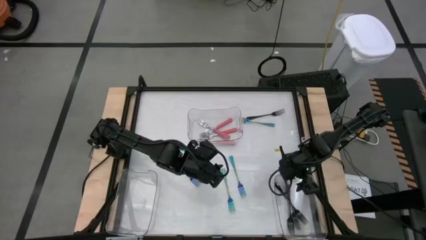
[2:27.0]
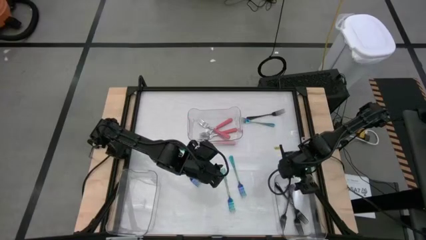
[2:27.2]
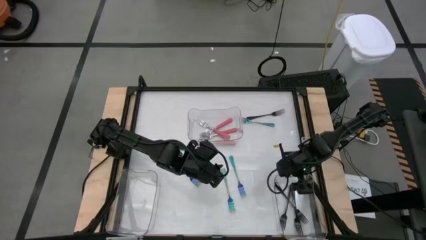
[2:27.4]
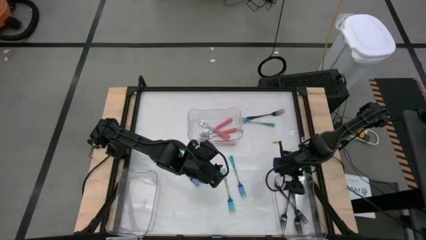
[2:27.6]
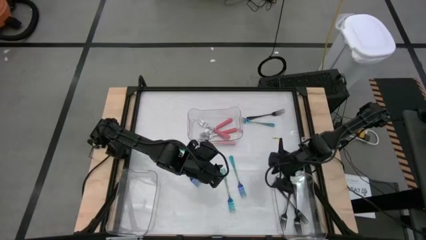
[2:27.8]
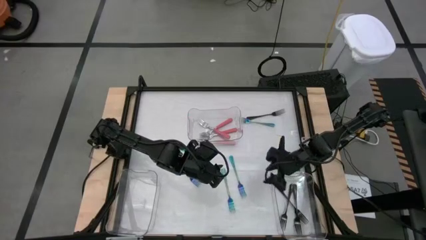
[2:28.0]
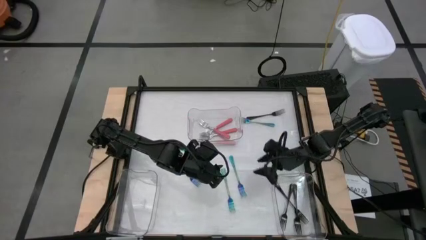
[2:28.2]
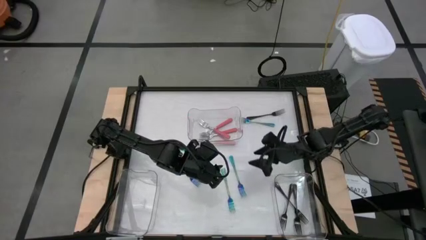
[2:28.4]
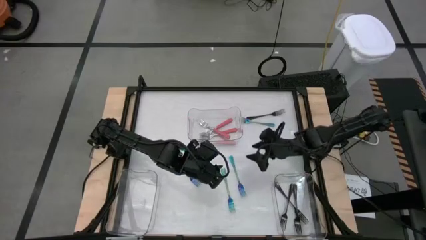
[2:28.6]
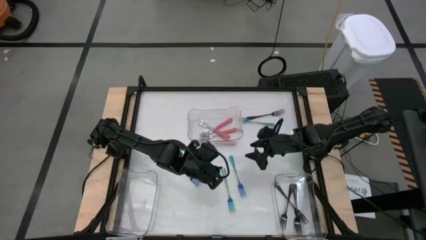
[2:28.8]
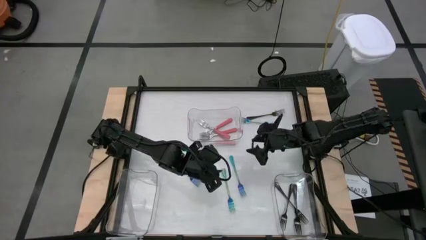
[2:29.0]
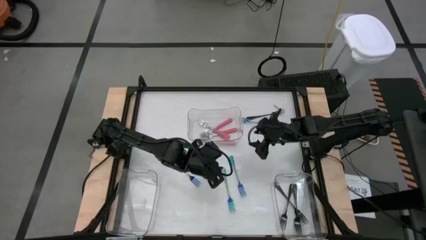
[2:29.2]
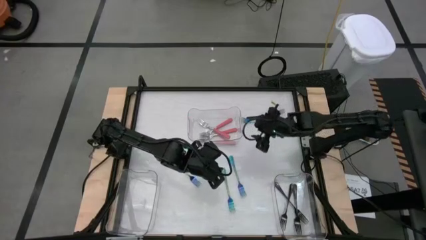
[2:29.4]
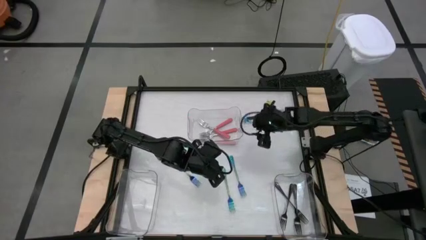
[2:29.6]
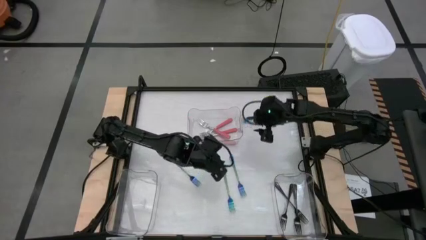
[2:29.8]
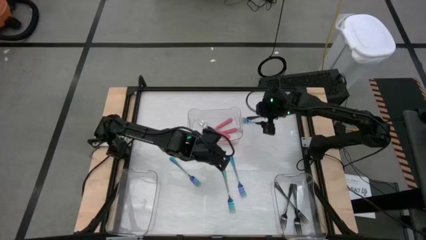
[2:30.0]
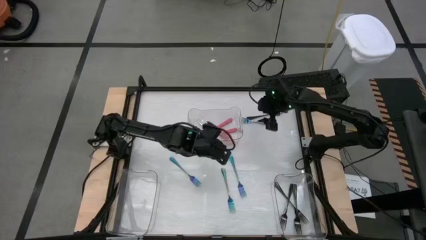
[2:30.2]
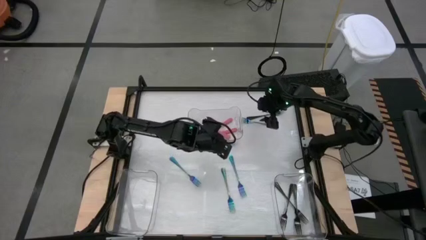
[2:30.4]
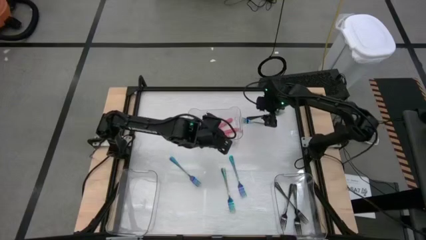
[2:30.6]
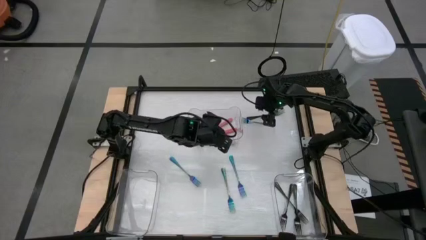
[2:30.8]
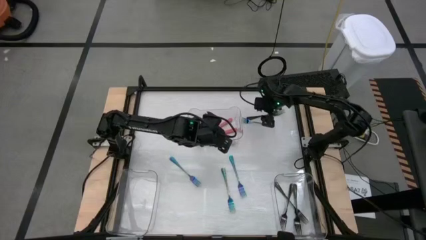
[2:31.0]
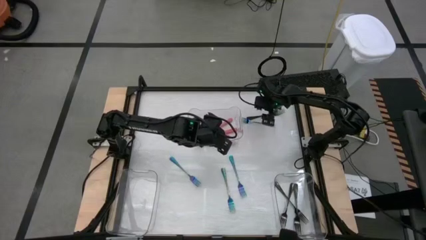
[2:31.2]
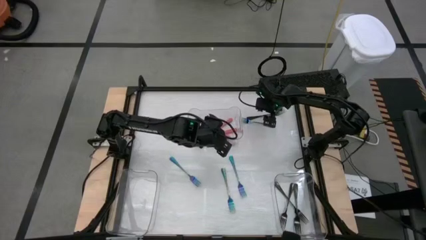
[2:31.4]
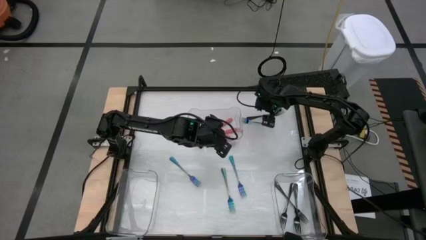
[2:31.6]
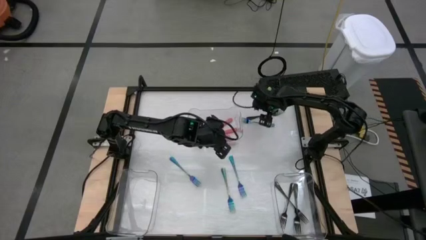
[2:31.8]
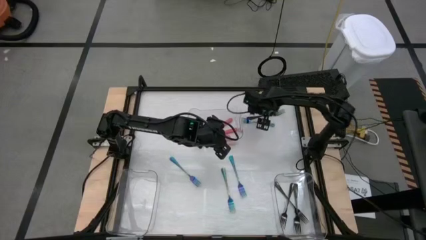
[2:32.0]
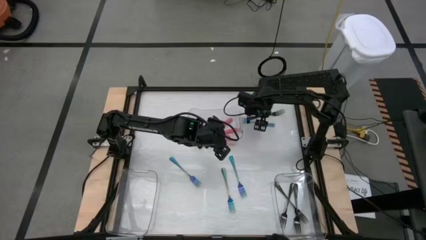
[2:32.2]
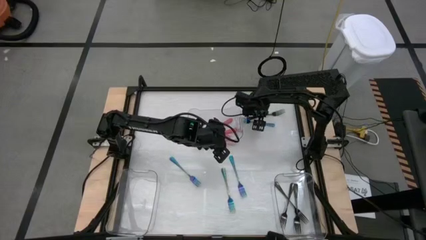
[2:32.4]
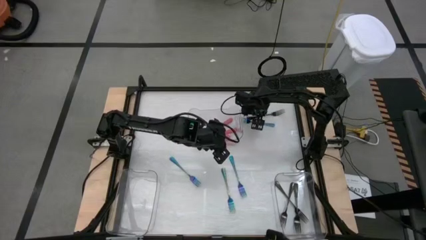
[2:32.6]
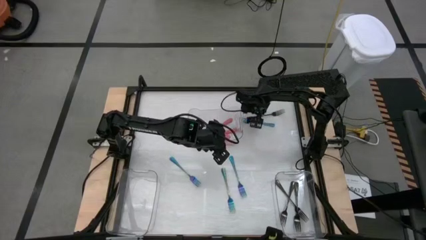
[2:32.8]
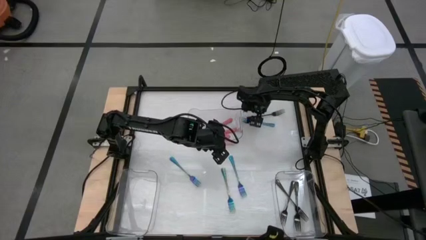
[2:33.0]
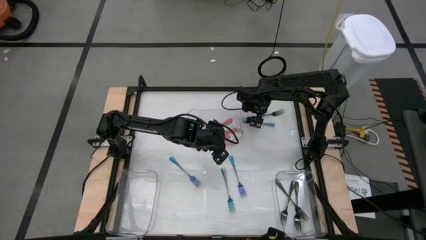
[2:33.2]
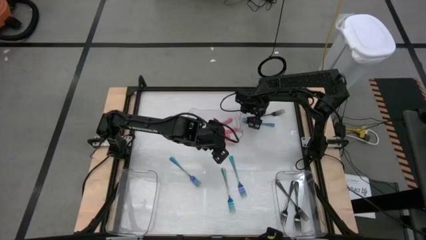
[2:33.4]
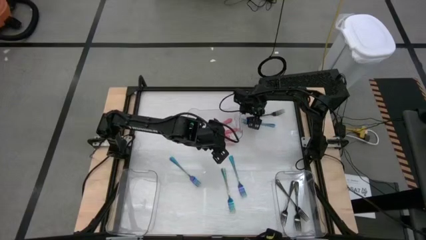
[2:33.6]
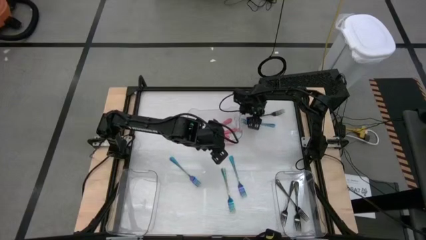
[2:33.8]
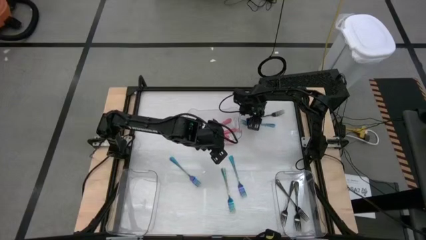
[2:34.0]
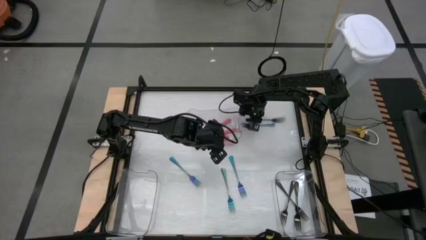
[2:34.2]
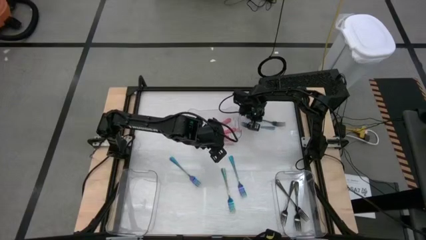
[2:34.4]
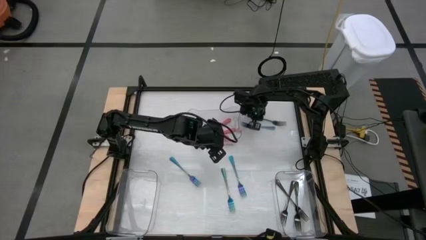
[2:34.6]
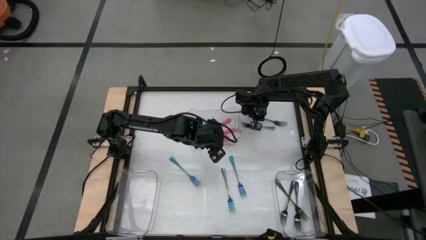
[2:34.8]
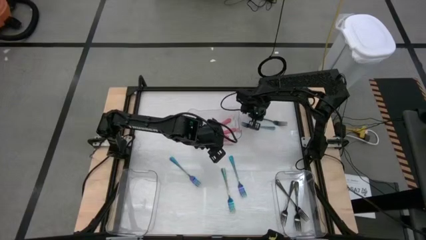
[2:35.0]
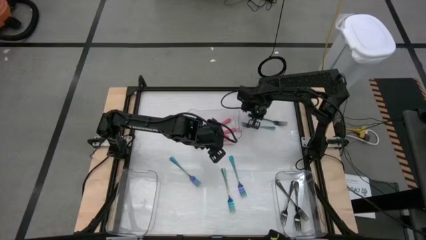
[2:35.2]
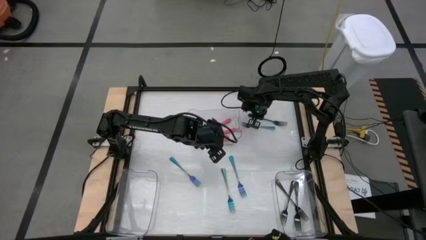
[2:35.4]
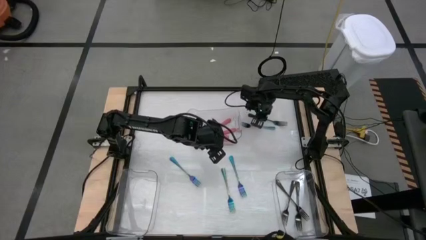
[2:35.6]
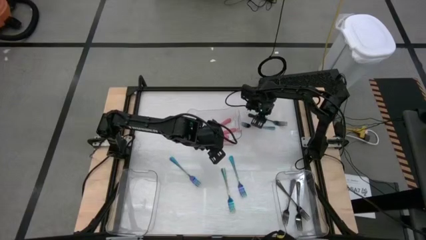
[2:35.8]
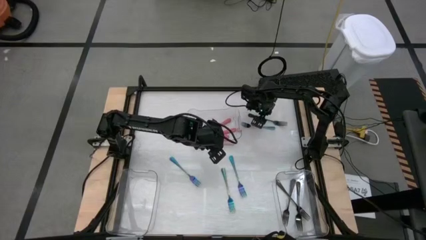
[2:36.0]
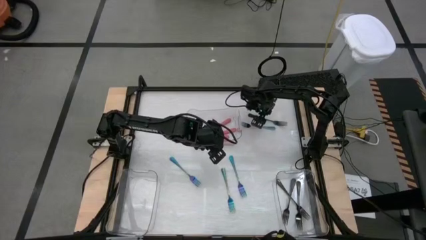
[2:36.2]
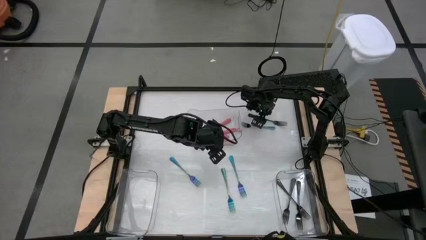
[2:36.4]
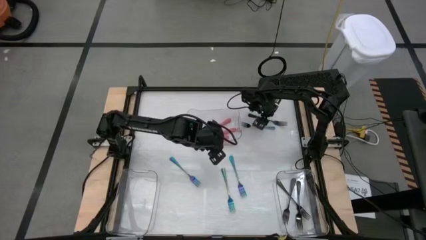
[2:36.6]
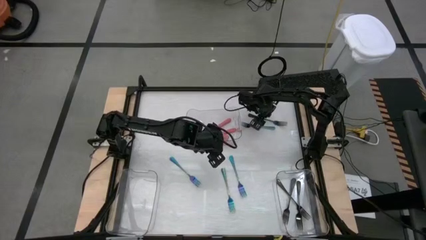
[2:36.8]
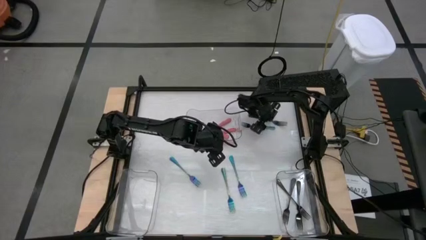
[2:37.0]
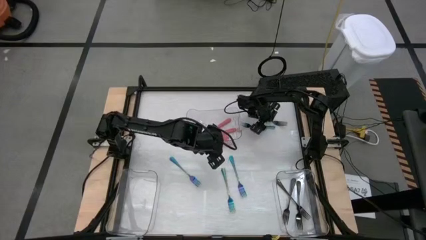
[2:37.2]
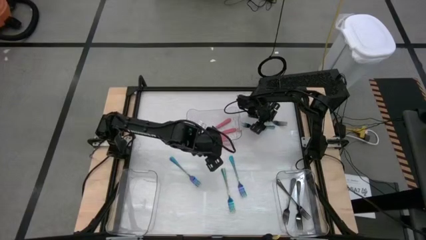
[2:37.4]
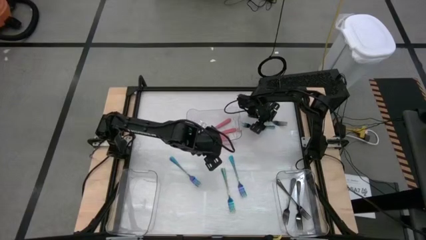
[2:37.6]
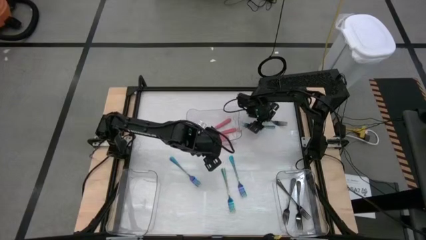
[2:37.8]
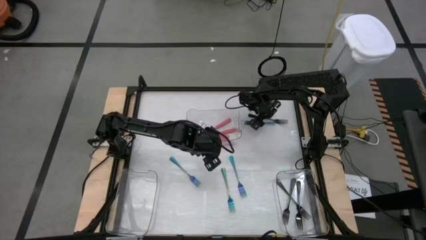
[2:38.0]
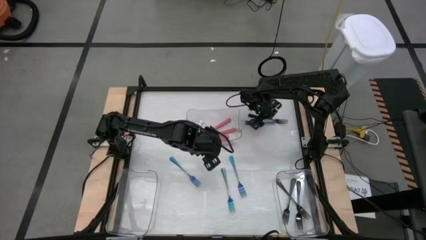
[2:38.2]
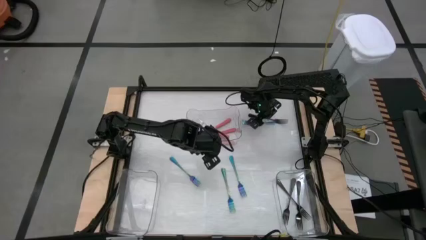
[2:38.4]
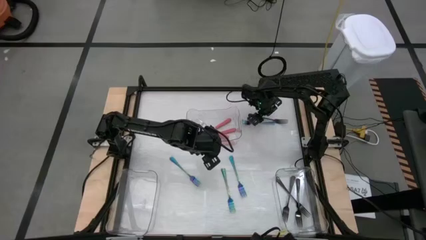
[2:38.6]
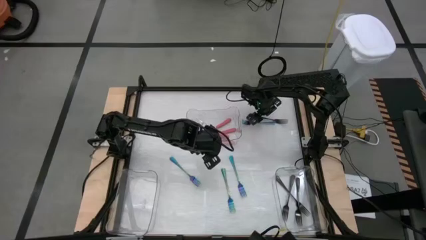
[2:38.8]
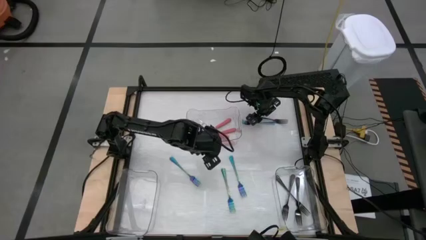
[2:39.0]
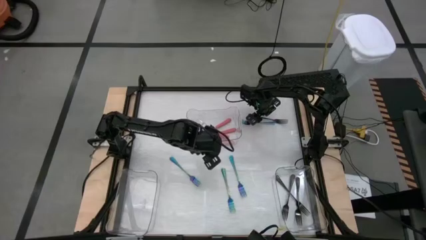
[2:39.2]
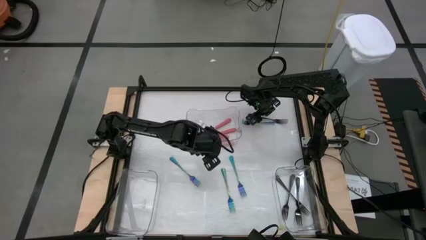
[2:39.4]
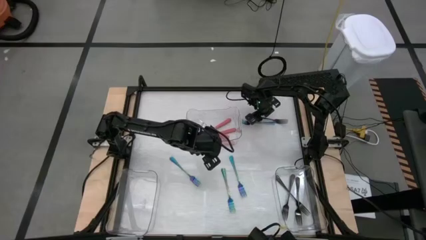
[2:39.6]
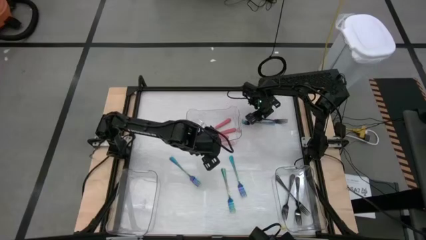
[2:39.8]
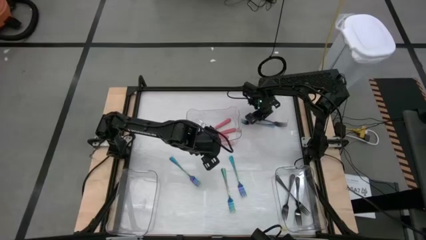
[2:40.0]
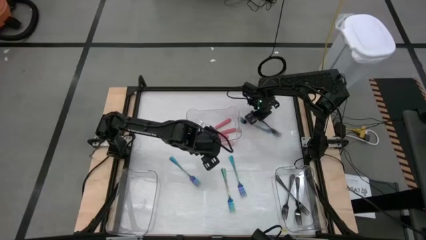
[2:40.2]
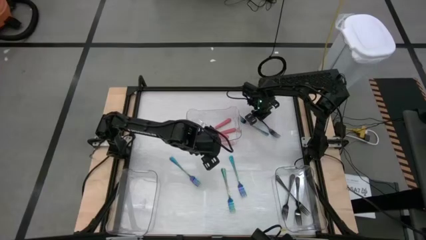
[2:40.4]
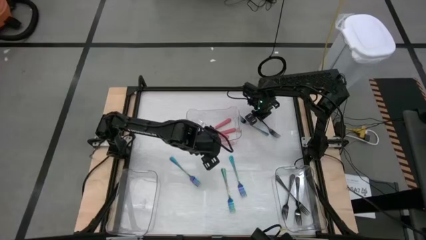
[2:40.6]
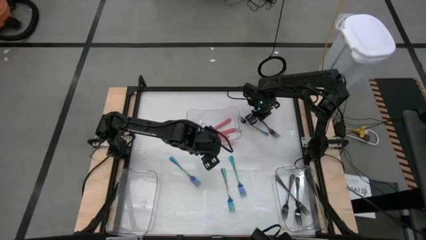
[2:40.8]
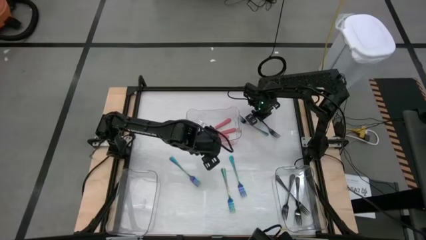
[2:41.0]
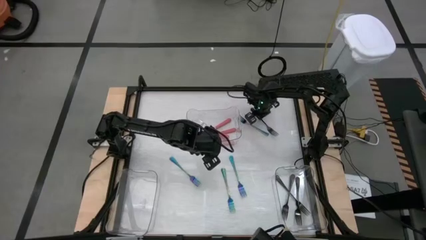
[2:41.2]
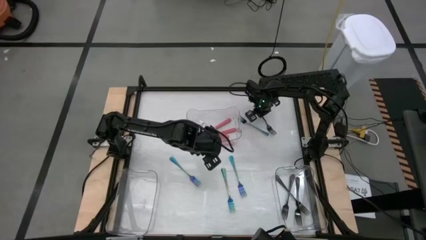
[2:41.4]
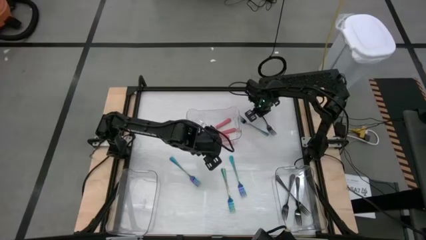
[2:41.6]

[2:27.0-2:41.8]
Task: Sort silverware by color (type)
Put the black fork into the right transparent bin
